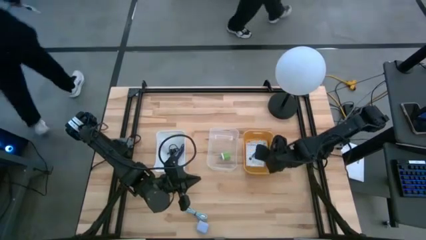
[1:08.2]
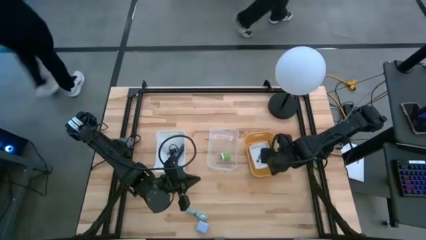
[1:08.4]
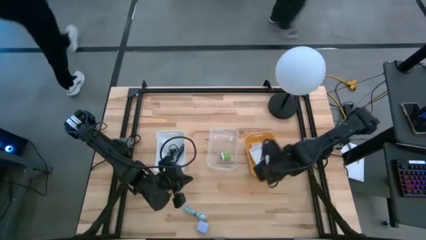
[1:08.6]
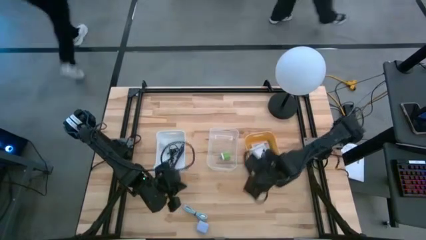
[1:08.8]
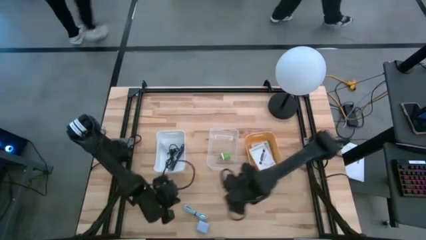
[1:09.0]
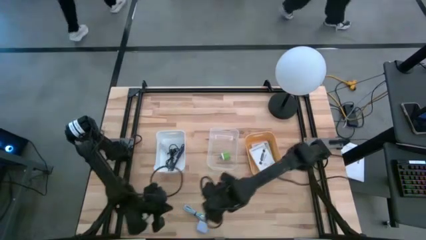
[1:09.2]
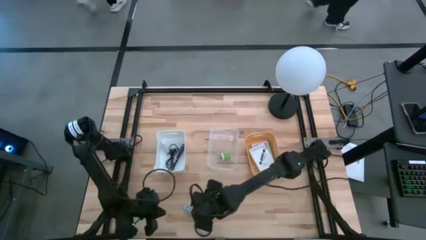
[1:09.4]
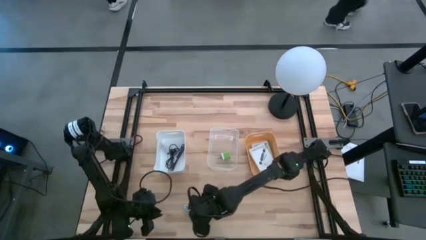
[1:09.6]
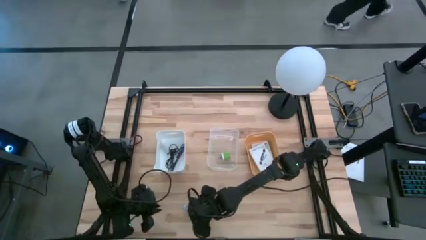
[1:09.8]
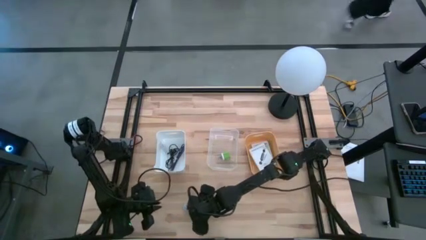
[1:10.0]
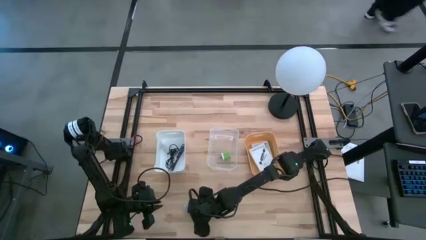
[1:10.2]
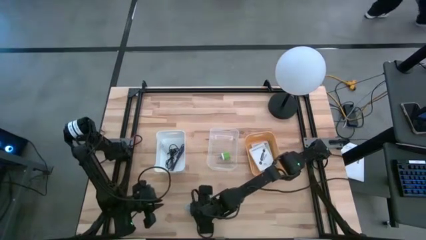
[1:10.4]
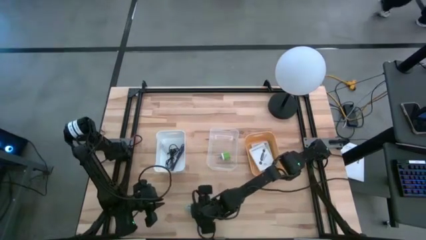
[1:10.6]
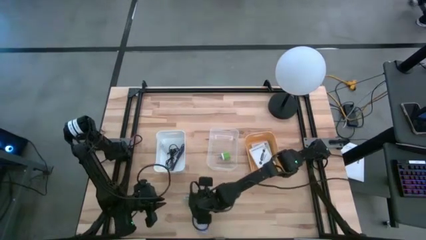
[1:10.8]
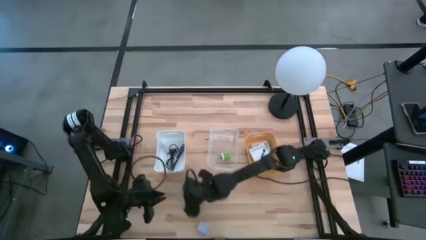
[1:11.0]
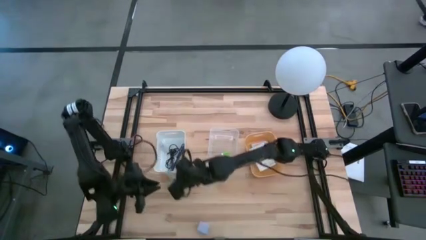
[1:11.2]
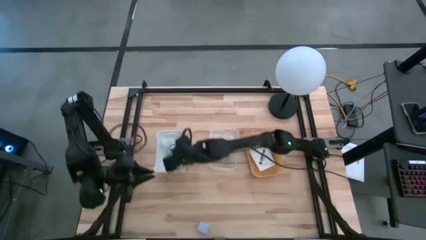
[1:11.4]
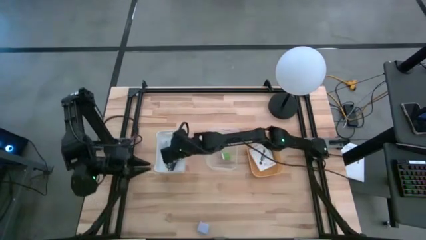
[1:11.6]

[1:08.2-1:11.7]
Task: Pick and place items into bin
Put the blue charger cable into the white bin

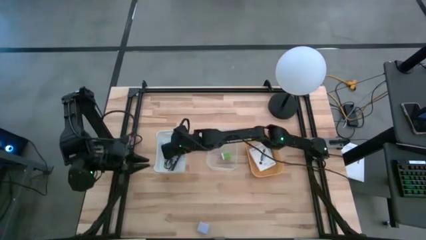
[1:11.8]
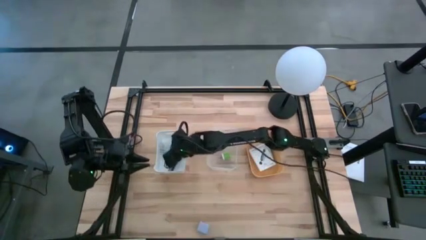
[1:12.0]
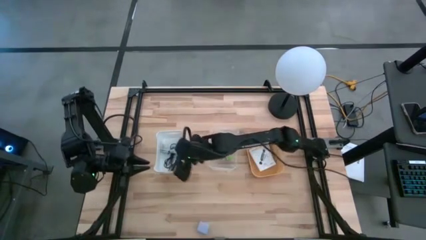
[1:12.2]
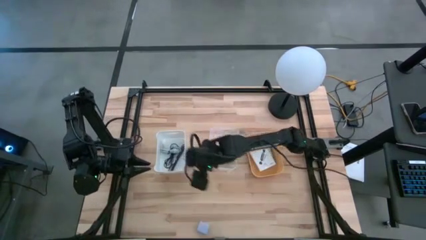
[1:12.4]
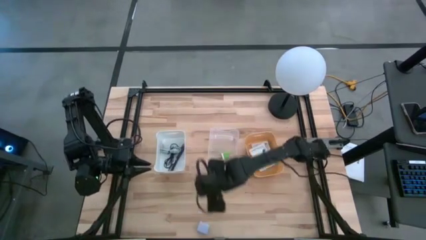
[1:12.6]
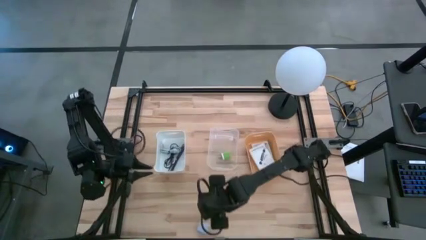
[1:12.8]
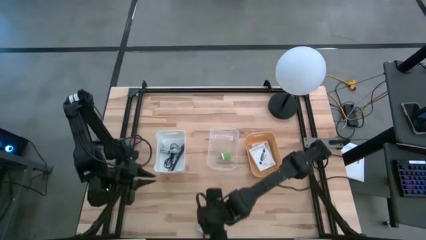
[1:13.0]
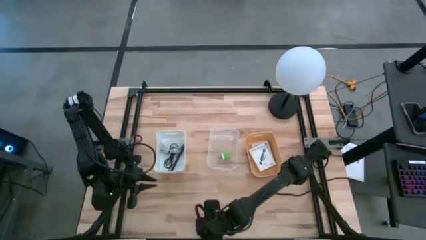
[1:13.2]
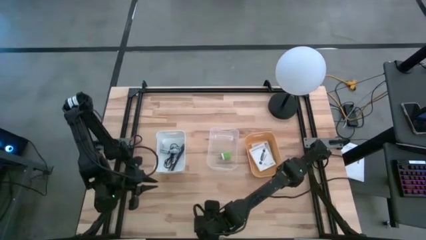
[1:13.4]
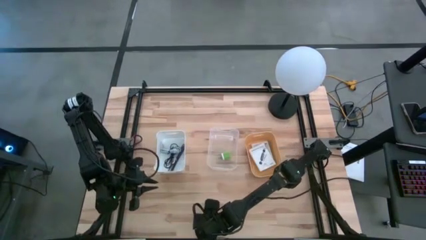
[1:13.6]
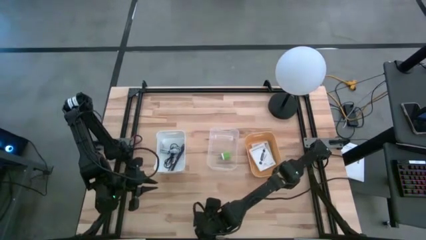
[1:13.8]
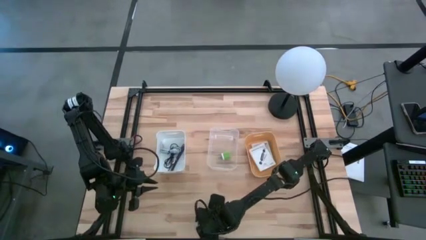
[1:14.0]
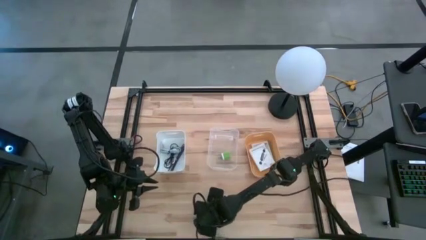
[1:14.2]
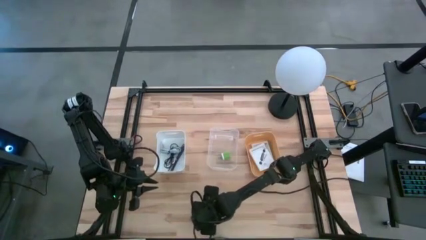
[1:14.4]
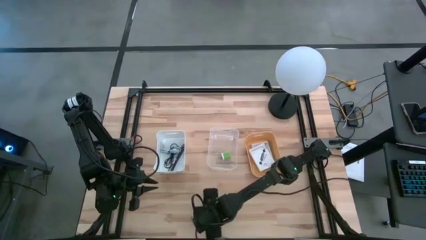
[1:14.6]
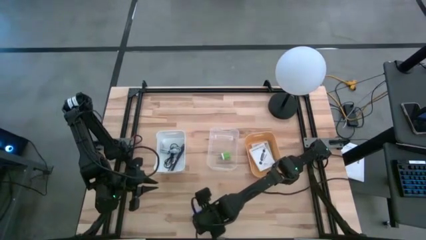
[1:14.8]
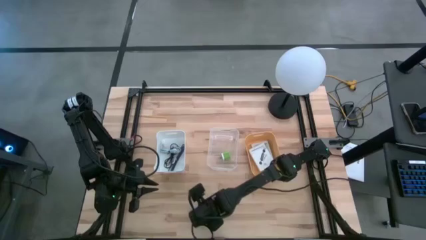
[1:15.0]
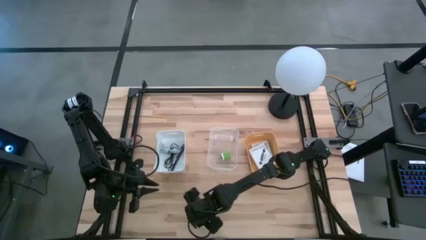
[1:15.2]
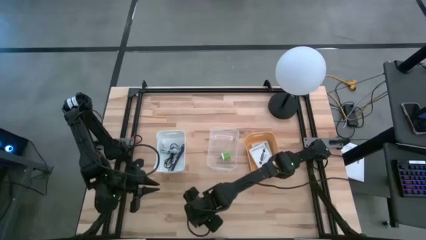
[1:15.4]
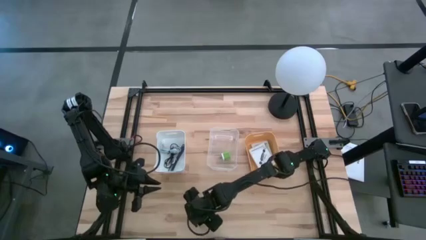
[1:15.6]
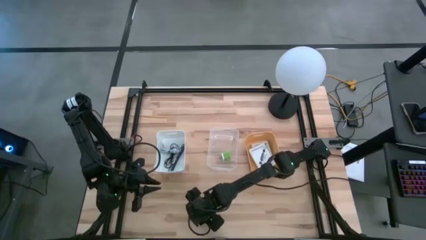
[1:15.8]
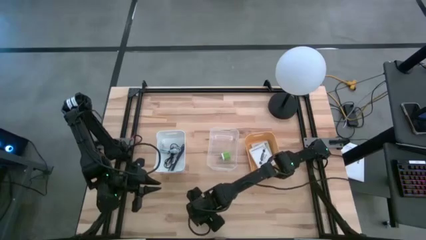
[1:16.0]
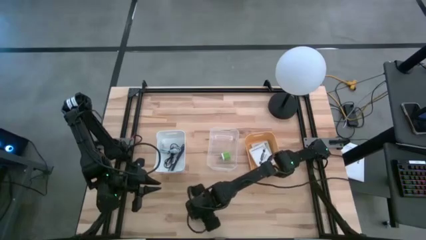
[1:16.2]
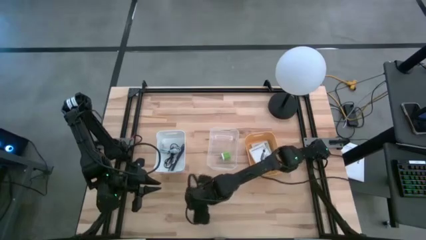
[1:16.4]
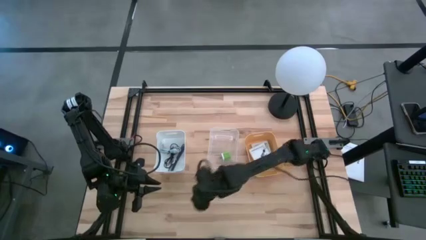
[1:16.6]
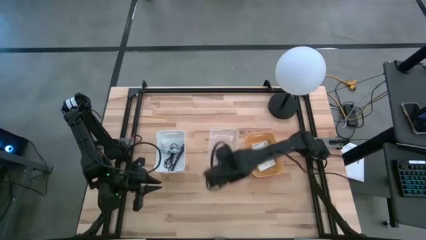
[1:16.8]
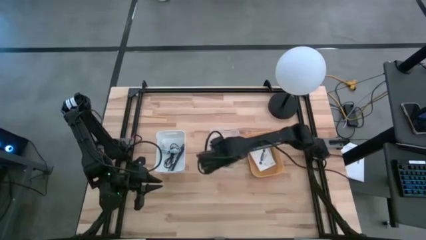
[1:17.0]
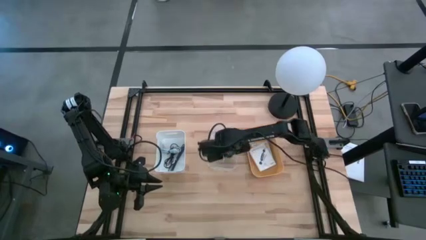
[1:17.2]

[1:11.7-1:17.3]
Put the blue charger adapter into the transparent bin

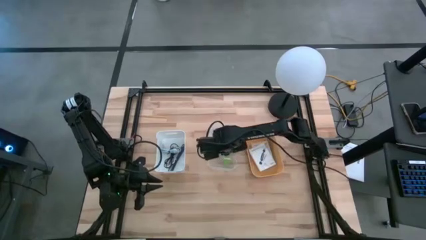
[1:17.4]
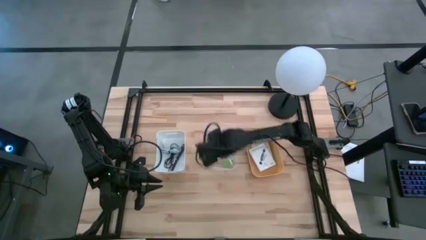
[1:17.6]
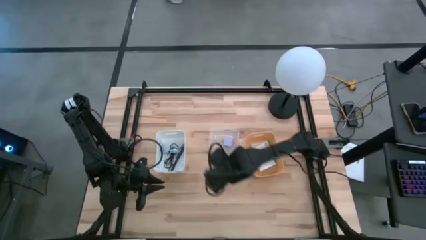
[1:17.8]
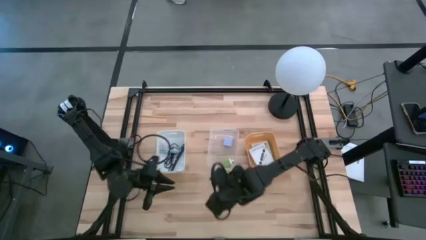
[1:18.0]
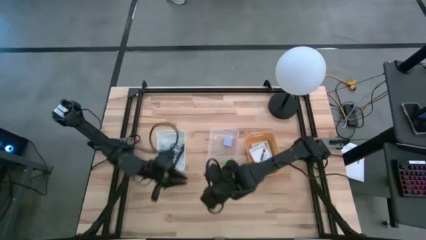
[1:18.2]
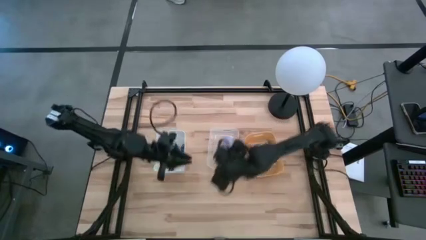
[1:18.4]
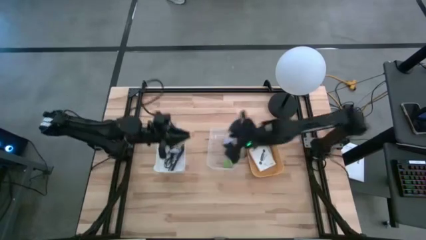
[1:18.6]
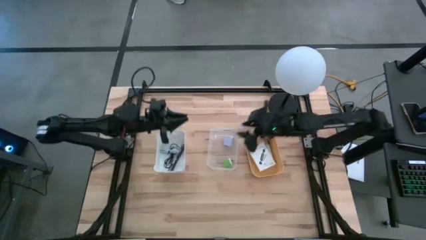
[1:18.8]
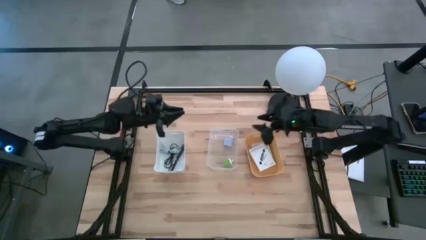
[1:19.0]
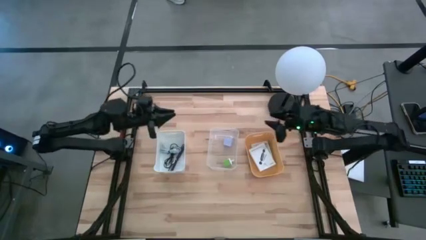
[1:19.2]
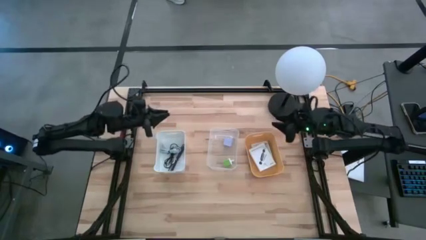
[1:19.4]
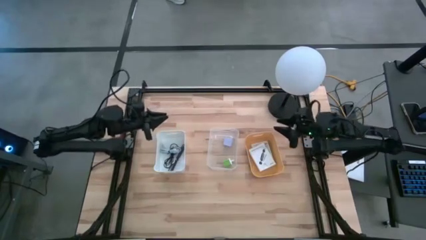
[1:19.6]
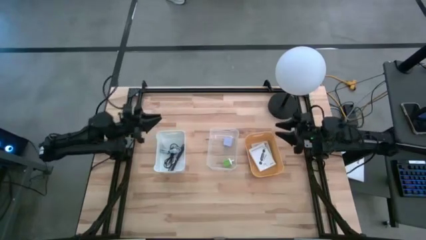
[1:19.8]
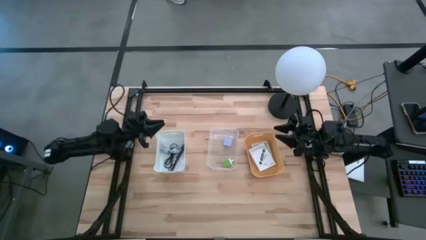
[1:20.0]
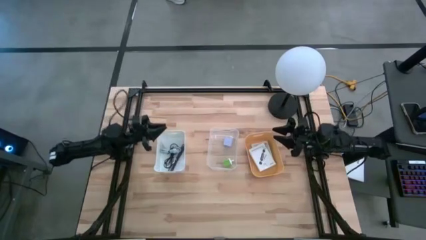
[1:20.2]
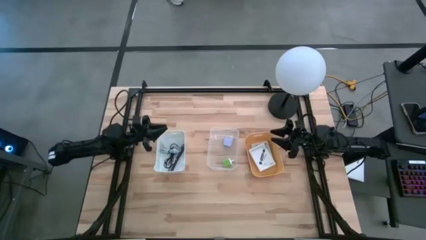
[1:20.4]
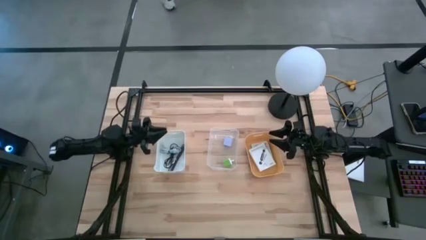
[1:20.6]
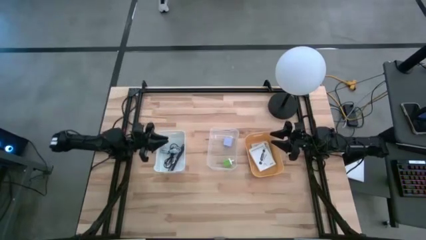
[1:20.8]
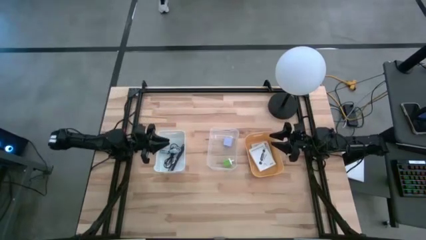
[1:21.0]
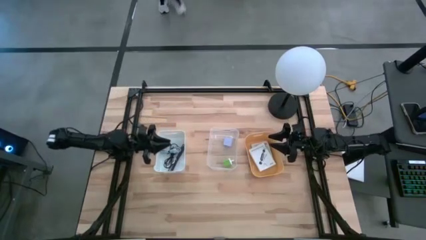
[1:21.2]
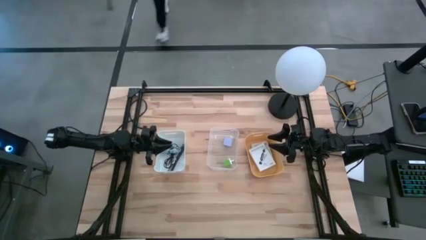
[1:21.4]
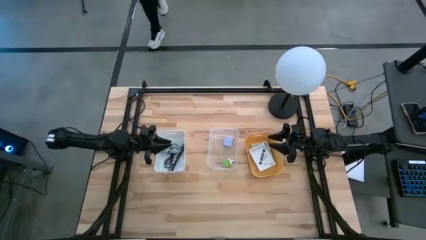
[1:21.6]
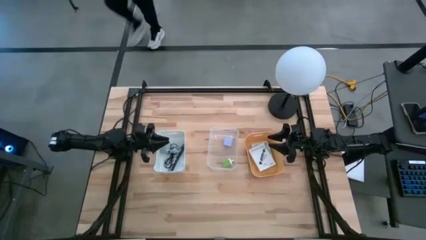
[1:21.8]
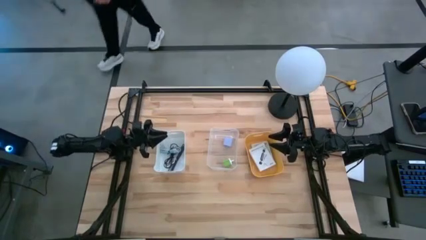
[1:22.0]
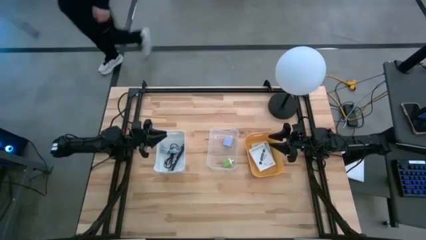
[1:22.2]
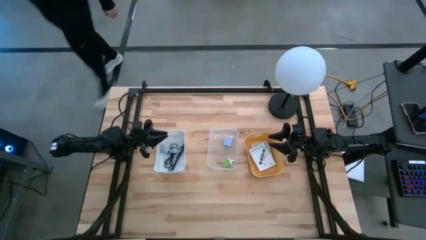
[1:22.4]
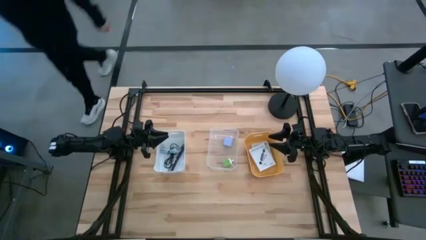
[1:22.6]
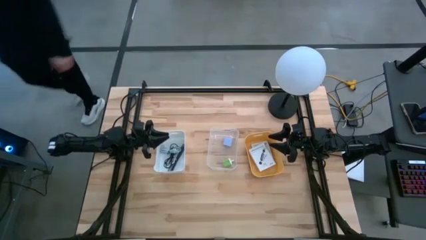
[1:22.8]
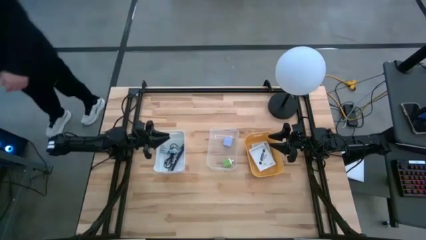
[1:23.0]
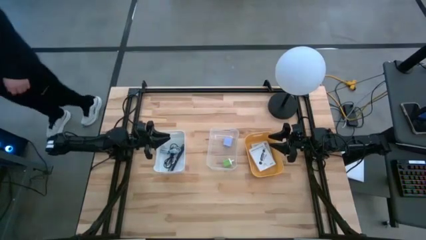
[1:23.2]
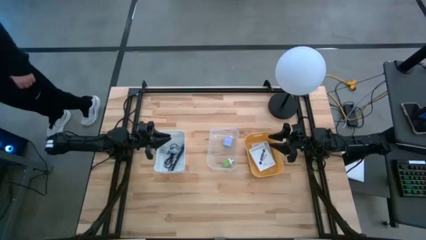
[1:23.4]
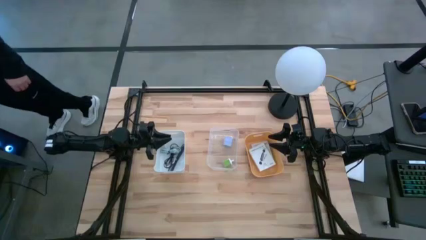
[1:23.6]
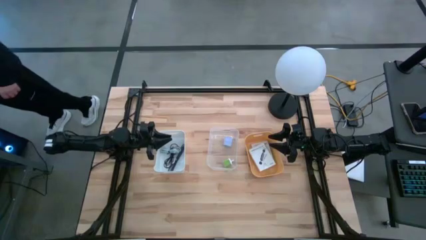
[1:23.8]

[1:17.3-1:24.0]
Return to Home Position
